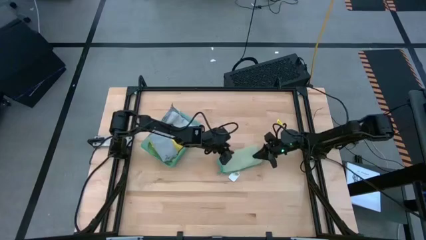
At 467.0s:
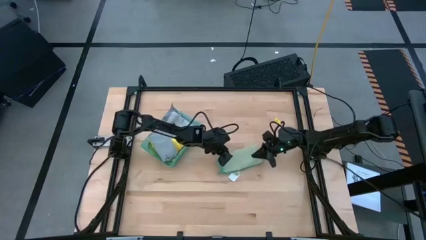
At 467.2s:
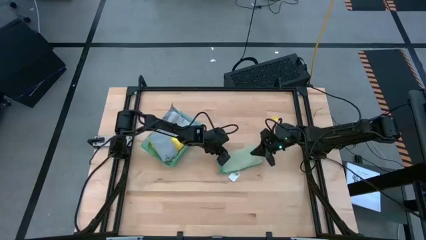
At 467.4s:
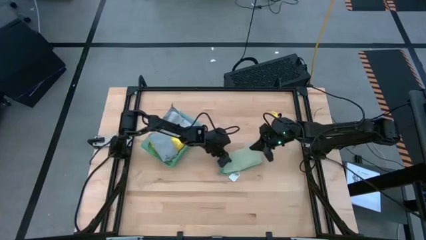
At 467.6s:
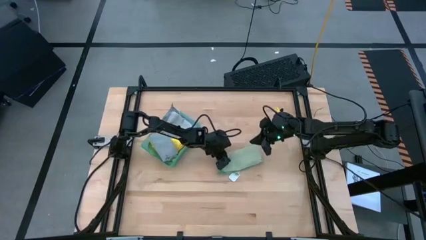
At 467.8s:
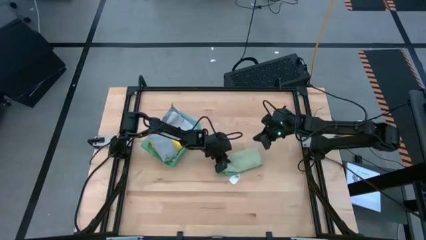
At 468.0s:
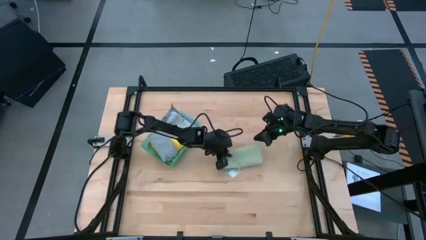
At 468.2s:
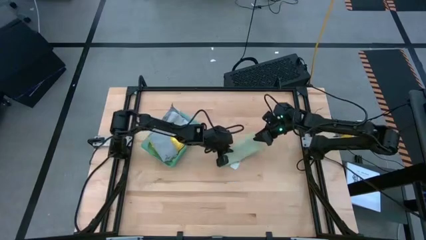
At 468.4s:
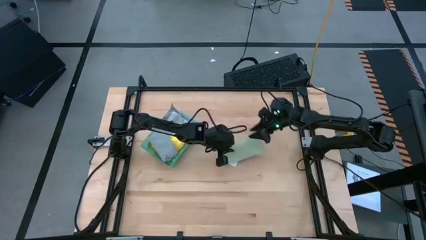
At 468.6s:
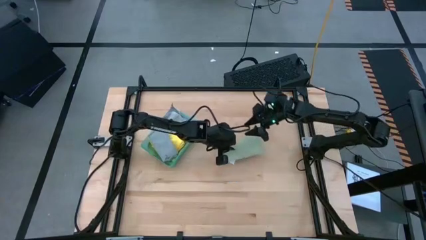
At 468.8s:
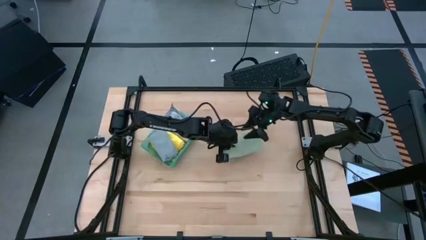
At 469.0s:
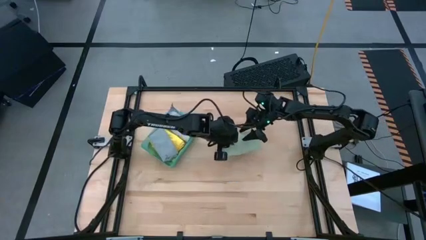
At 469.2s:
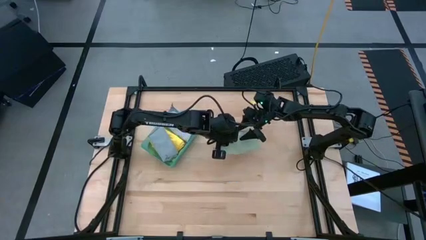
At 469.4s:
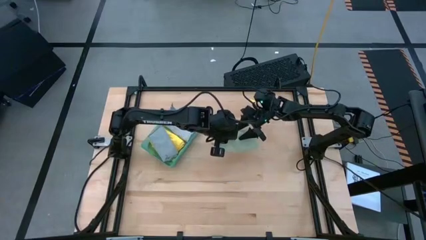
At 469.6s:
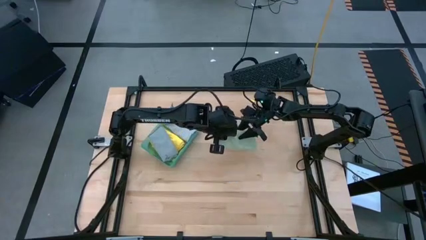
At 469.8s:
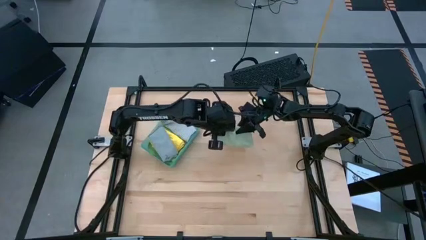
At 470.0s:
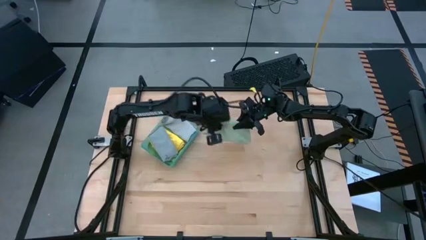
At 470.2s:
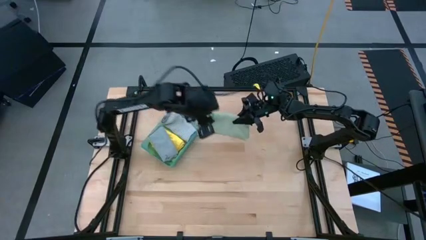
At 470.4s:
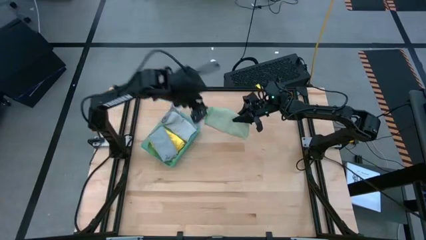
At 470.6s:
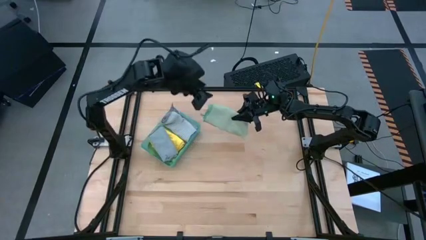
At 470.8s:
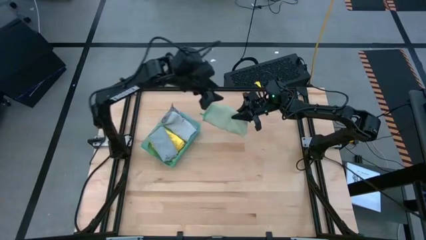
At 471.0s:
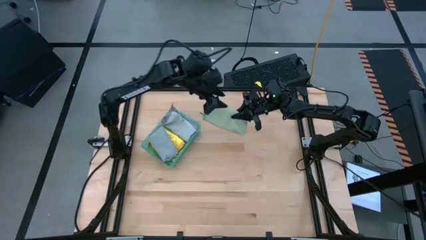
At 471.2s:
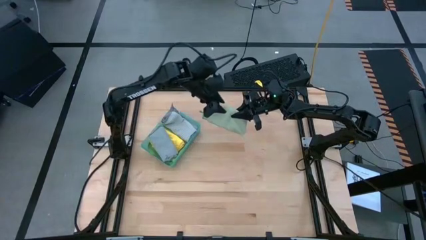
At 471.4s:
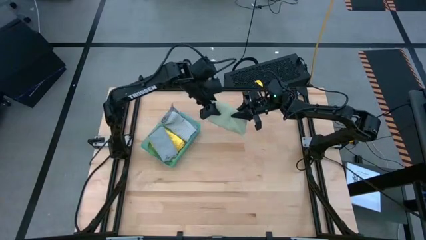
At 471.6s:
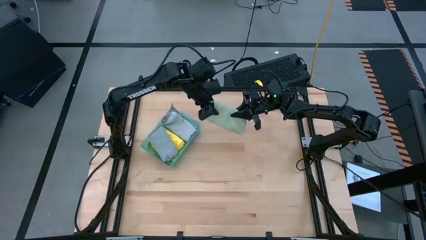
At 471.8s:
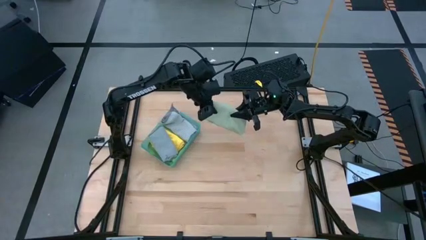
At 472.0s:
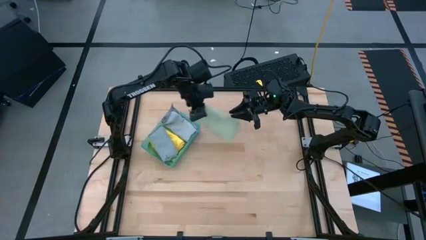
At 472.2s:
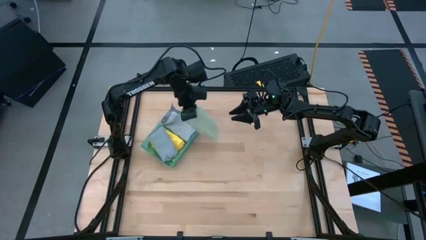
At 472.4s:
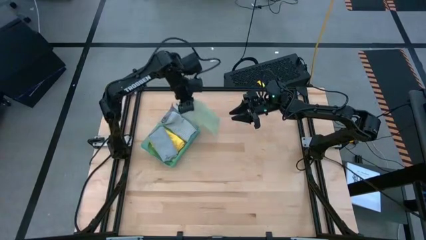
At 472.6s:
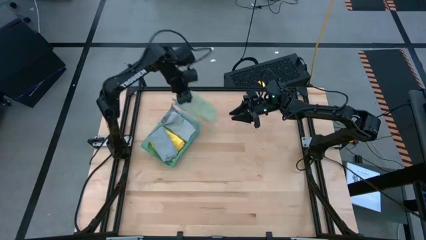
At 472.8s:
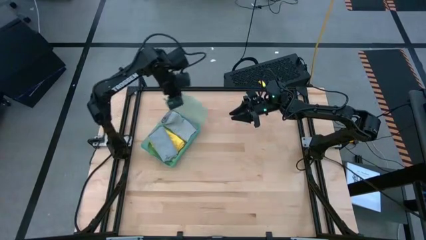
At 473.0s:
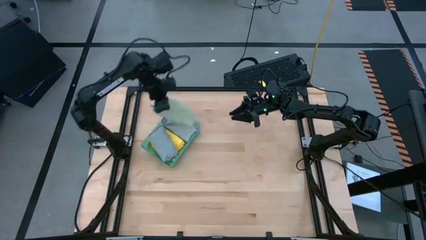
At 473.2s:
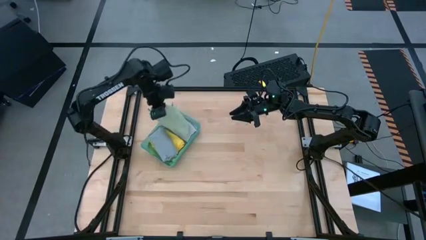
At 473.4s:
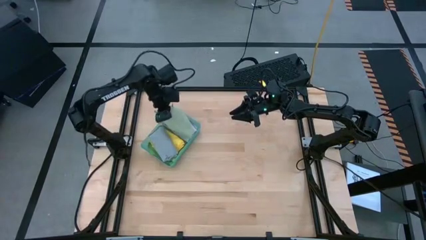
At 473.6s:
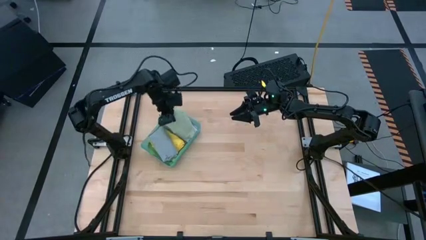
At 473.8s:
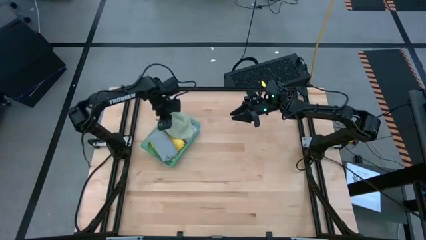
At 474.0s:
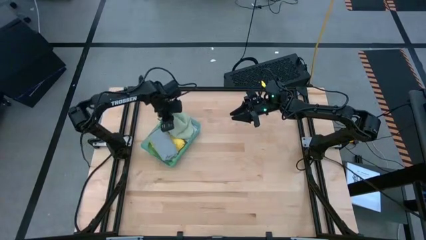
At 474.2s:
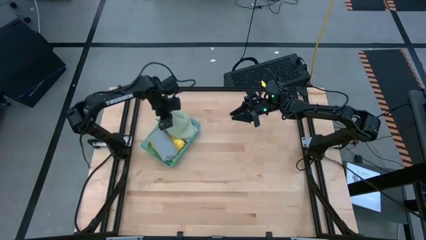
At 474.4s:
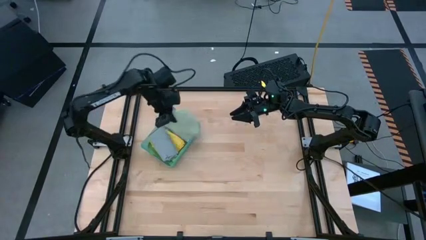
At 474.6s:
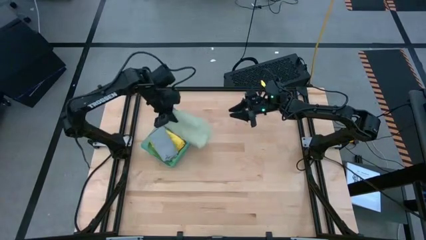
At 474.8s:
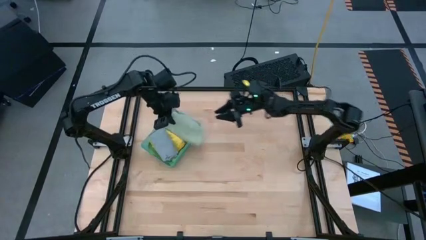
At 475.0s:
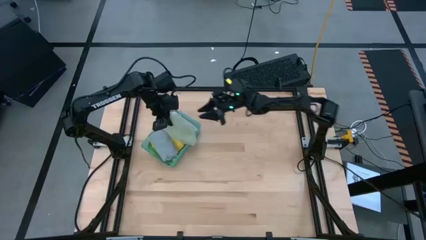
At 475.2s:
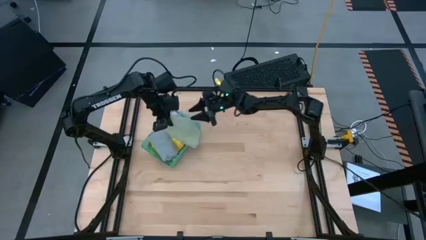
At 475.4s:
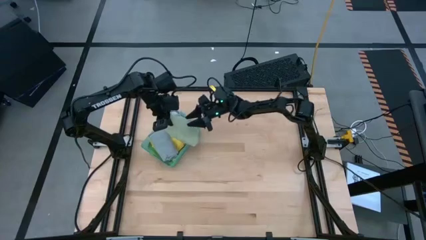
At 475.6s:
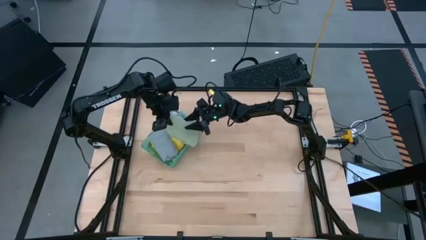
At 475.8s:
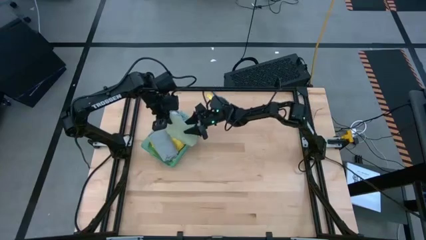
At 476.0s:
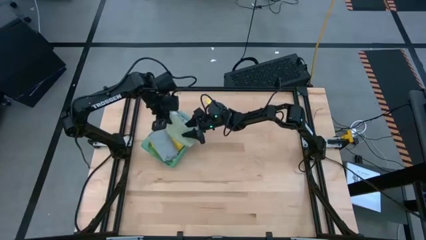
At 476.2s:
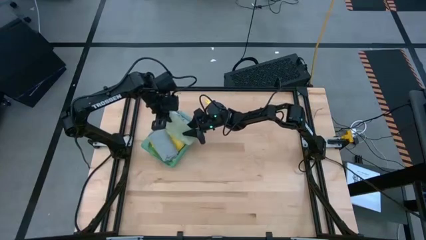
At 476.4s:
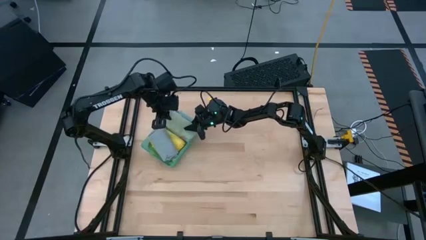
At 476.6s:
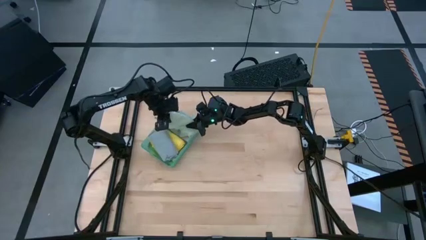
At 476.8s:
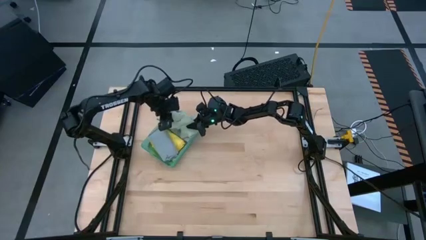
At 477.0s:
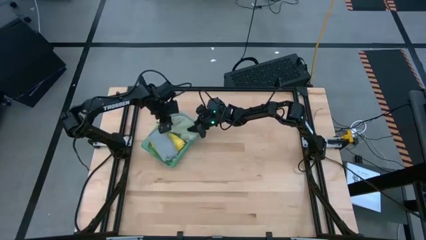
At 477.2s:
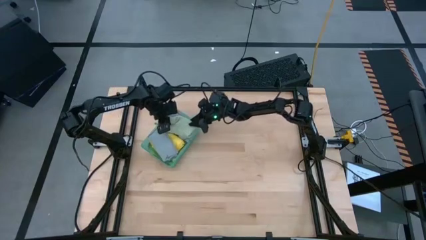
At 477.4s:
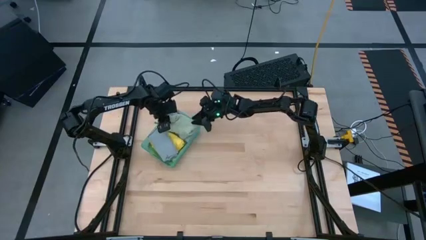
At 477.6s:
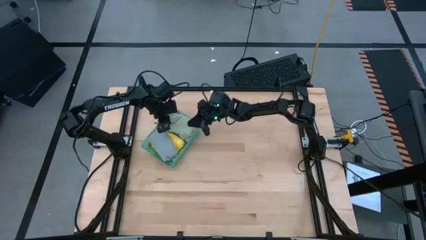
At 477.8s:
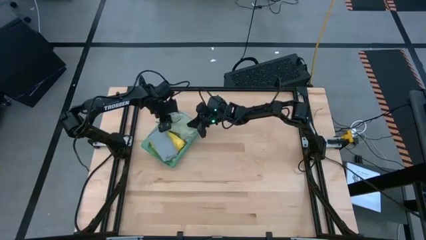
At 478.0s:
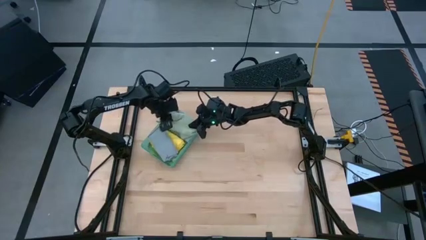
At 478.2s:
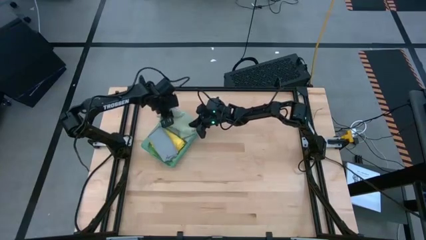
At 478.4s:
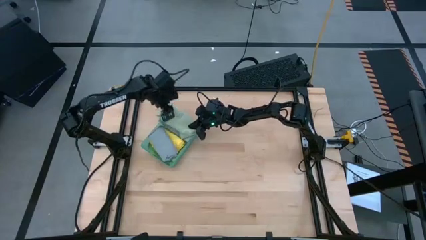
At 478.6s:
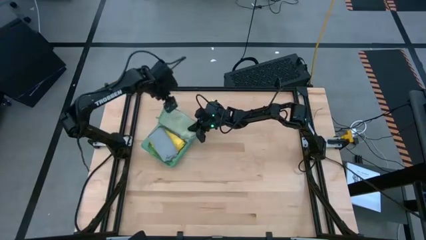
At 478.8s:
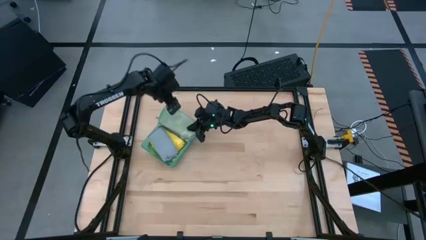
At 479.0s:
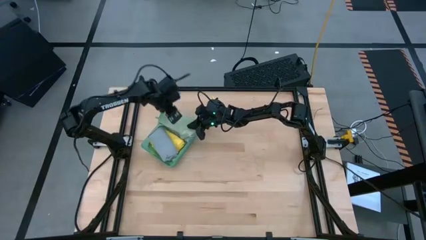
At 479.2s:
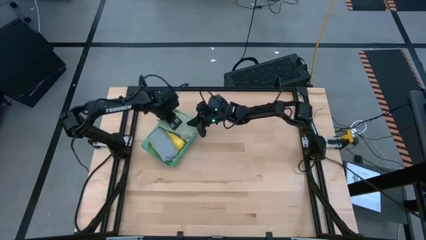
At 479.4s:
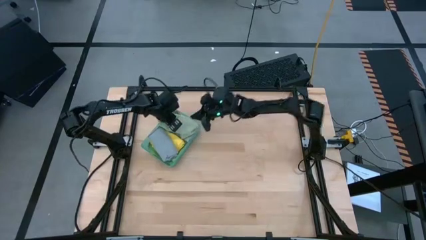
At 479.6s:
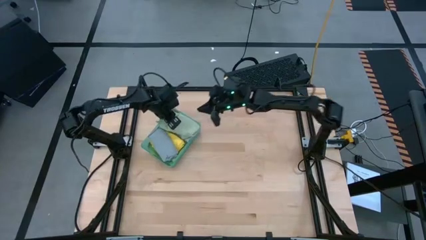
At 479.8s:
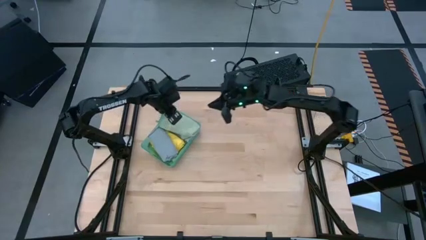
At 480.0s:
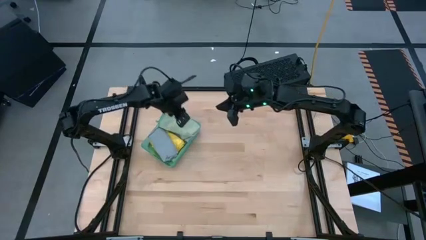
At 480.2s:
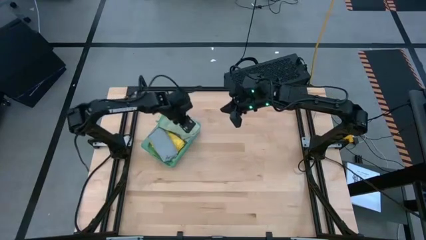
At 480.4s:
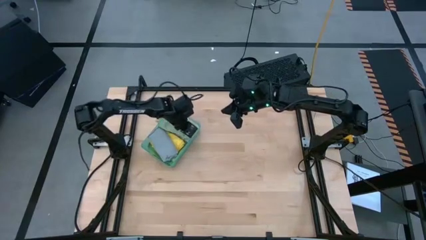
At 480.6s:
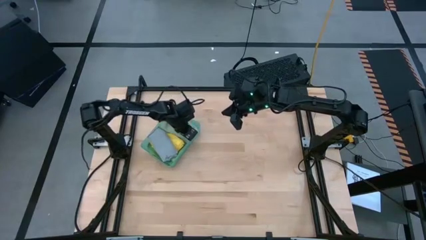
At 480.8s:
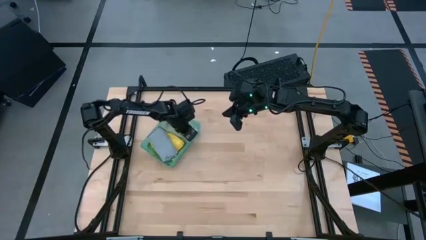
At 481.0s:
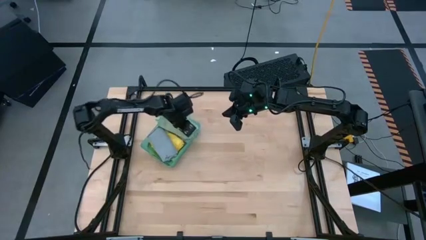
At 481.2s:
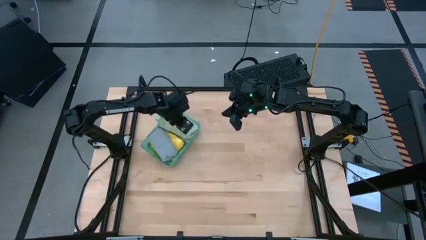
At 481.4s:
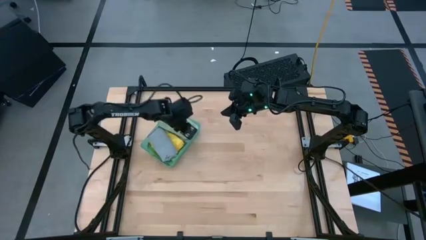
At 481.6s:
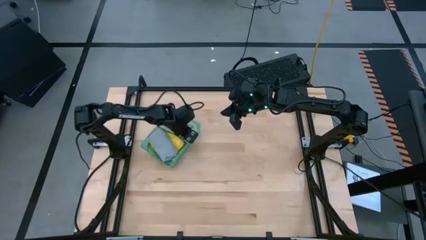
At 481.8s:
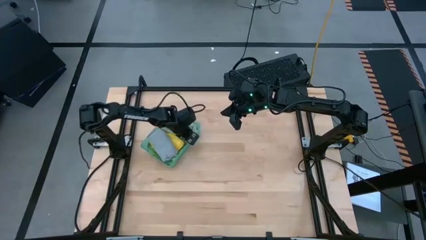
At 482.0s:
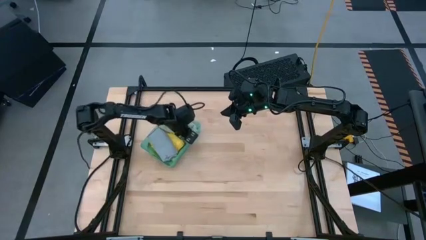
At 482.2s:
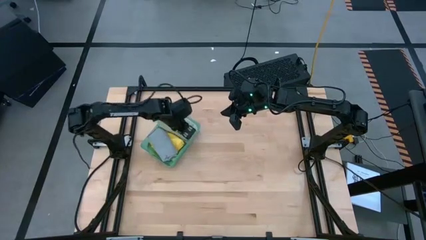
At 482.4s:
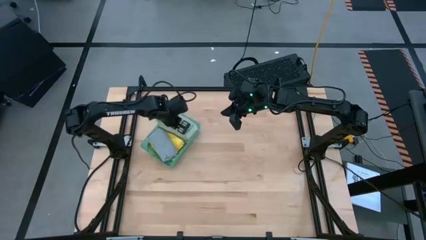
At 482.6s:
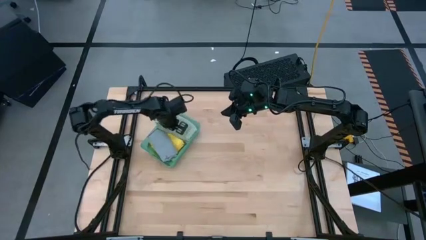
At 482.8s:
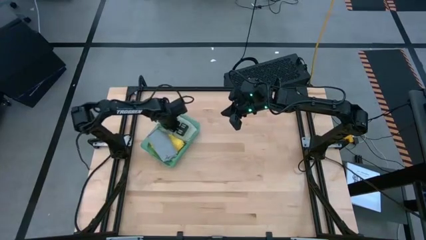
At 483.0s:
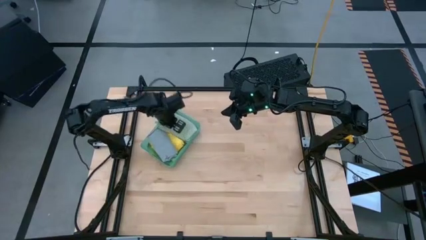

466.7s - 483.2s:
Task: Fold microfiber towels
Put the light green microfiber cloth into the green bin

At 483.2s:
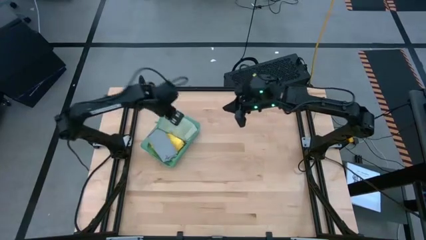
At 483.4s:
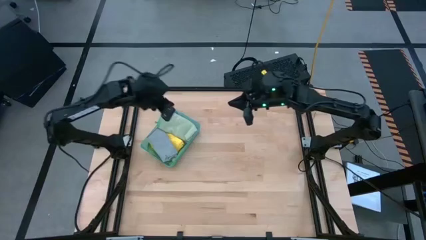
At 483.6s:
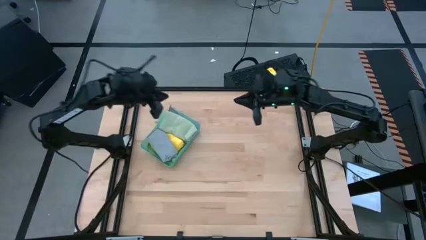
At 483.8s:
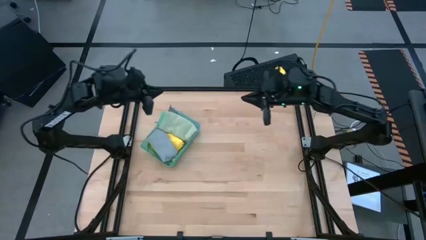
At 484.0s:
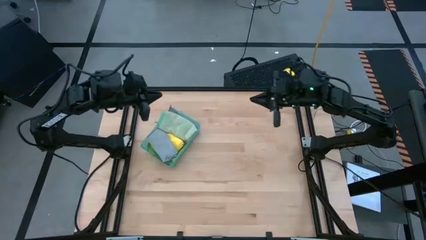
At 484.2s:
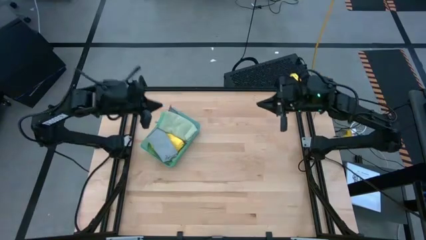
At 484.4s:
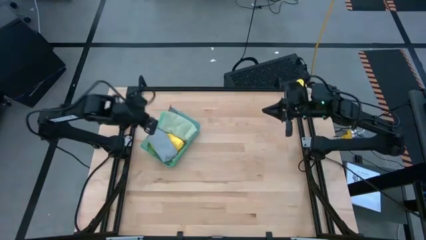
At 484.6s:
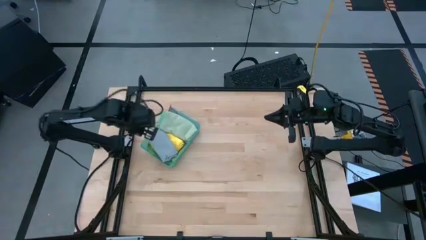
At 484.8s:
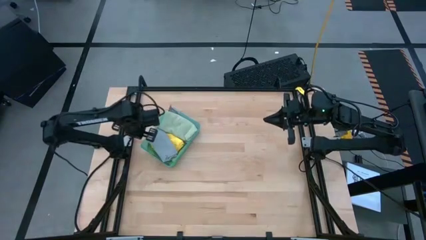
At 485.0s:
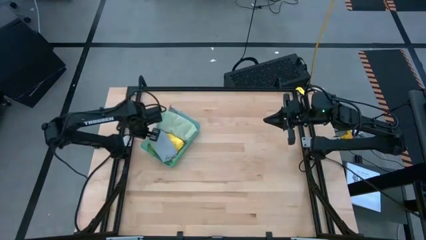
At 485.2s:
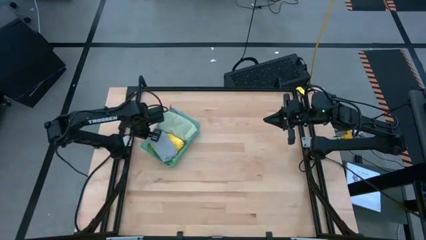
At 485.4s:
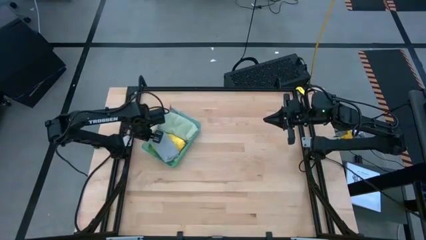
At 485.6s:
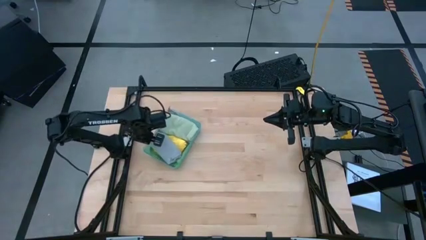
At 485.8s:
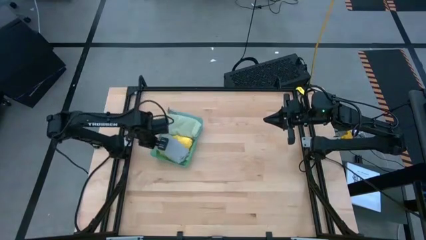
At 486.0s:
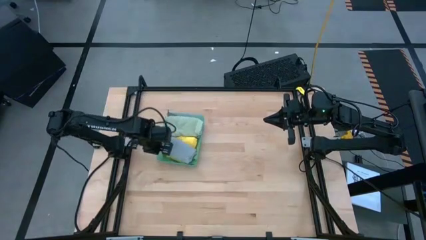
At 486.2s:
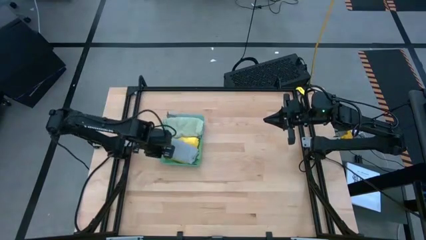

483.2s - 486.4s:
Adjust the green bin on the table
